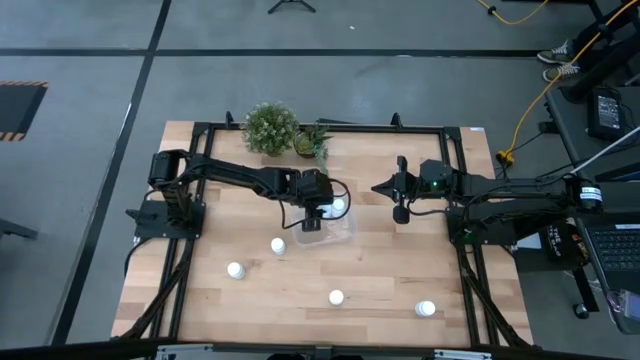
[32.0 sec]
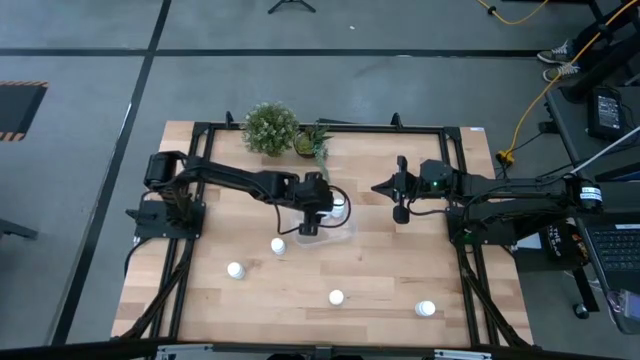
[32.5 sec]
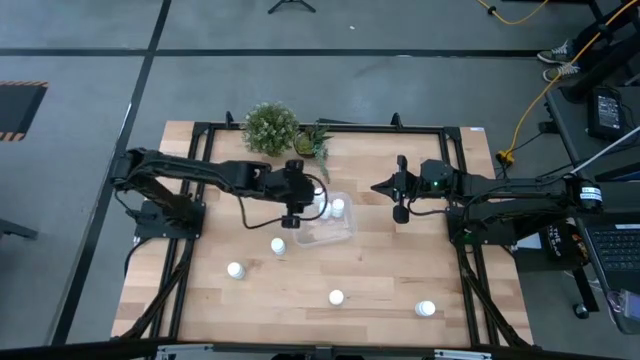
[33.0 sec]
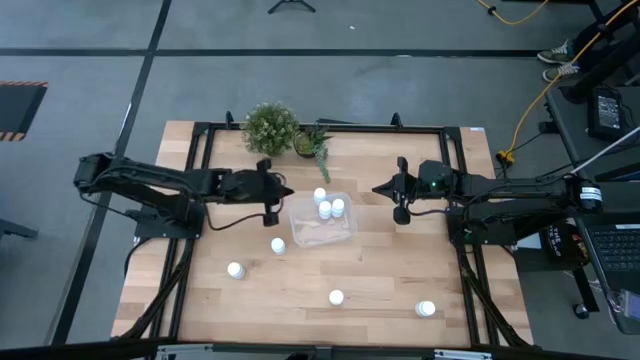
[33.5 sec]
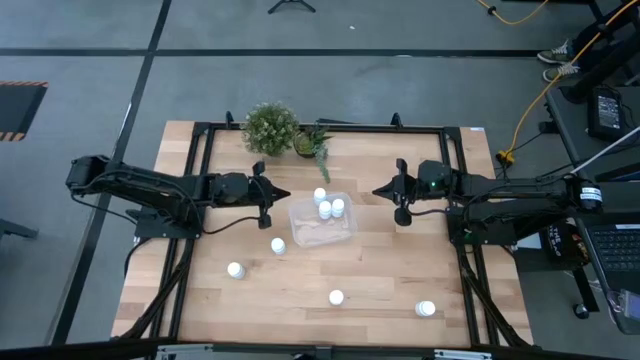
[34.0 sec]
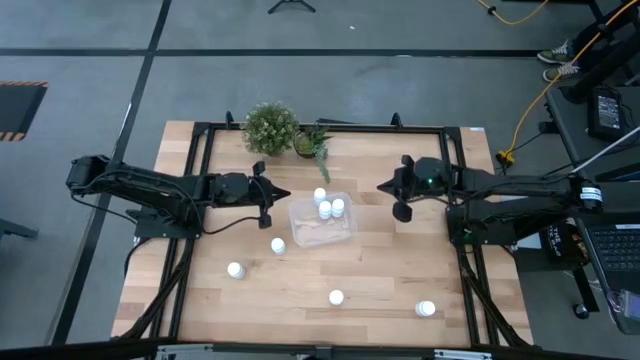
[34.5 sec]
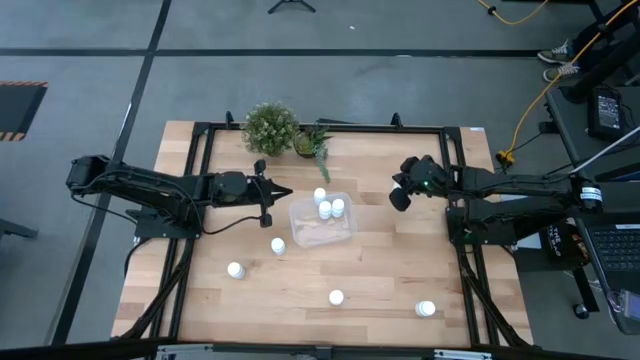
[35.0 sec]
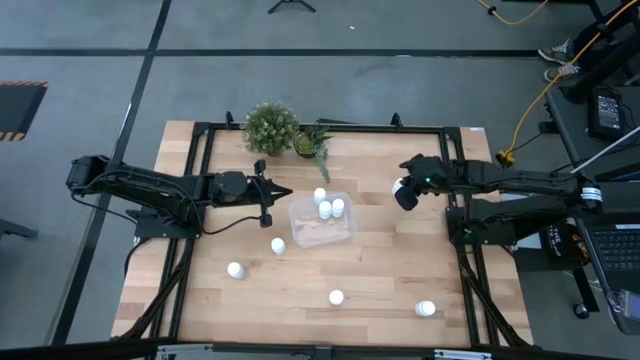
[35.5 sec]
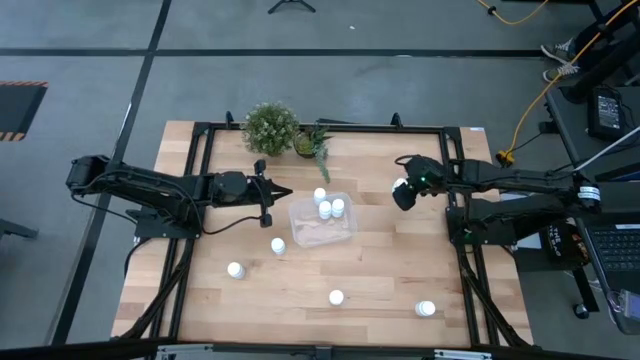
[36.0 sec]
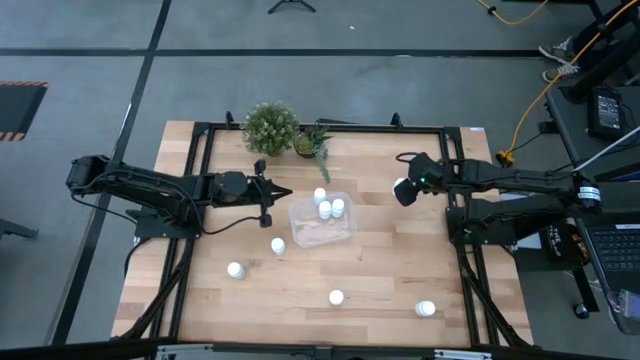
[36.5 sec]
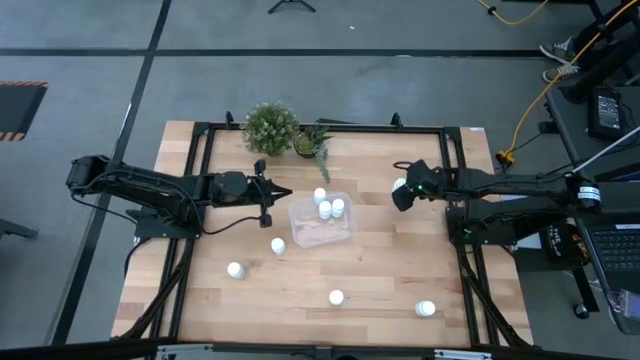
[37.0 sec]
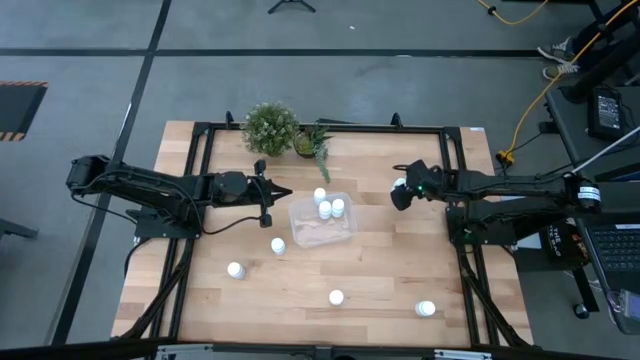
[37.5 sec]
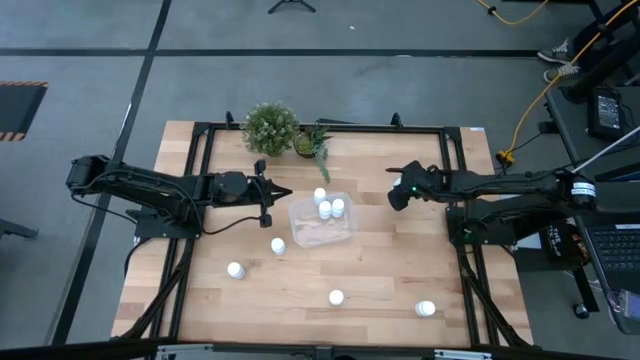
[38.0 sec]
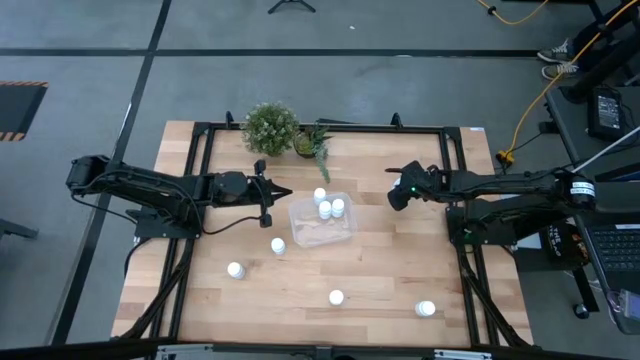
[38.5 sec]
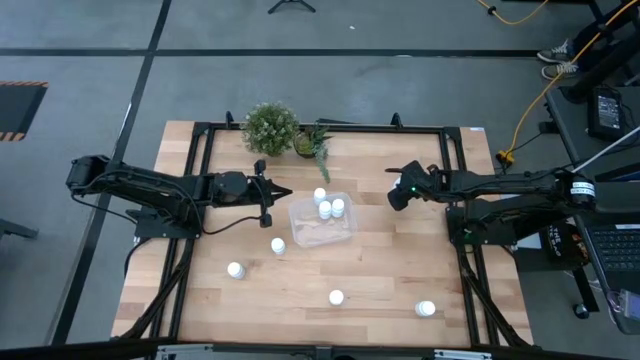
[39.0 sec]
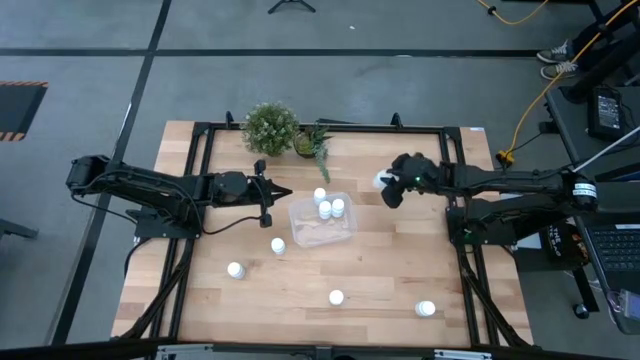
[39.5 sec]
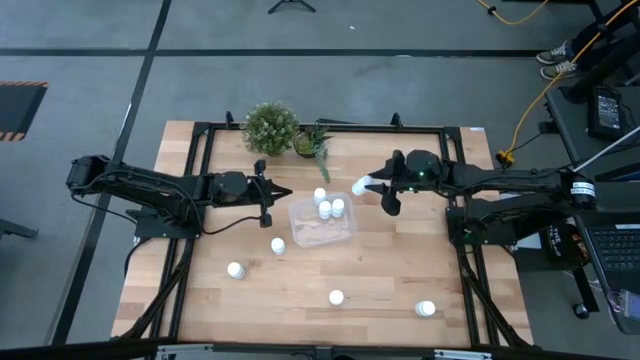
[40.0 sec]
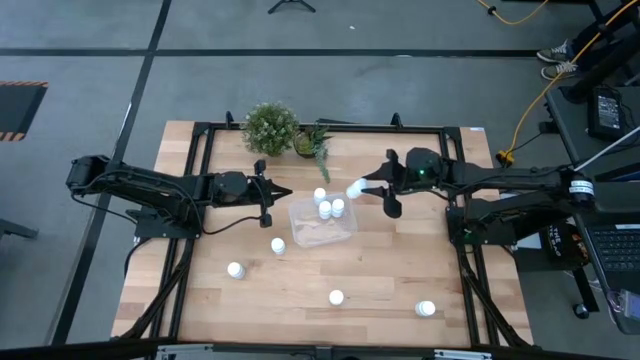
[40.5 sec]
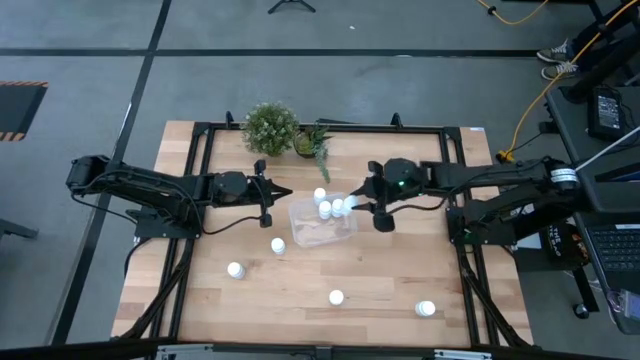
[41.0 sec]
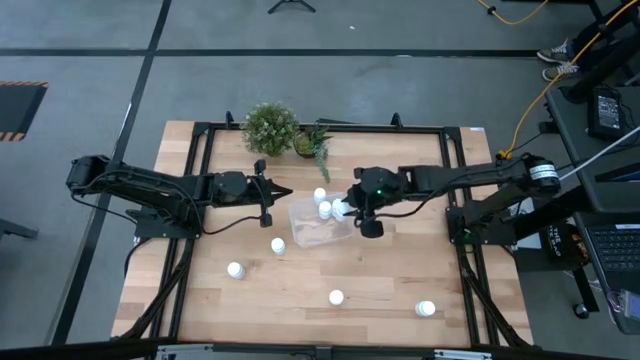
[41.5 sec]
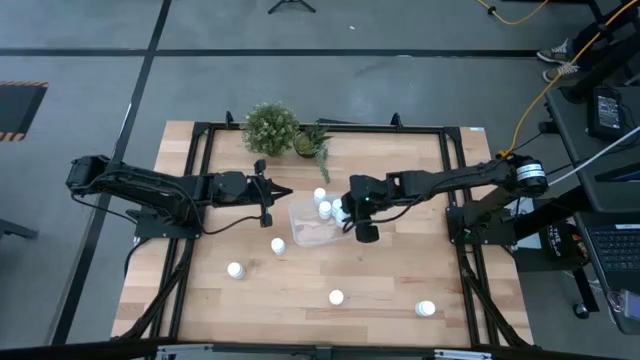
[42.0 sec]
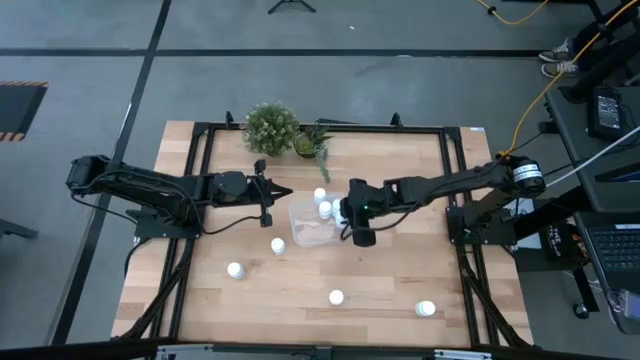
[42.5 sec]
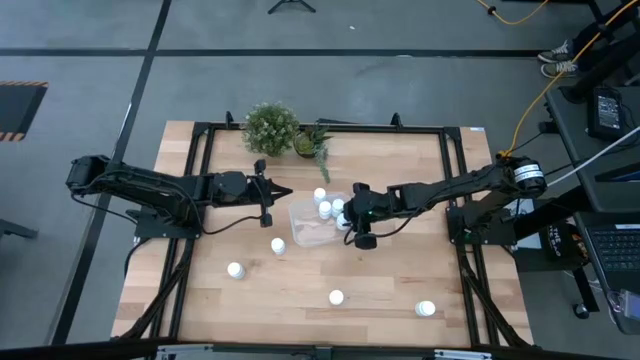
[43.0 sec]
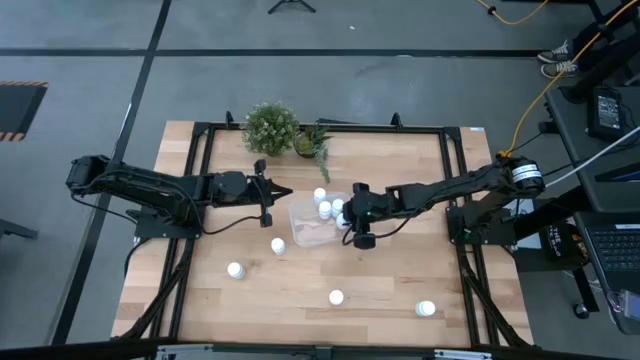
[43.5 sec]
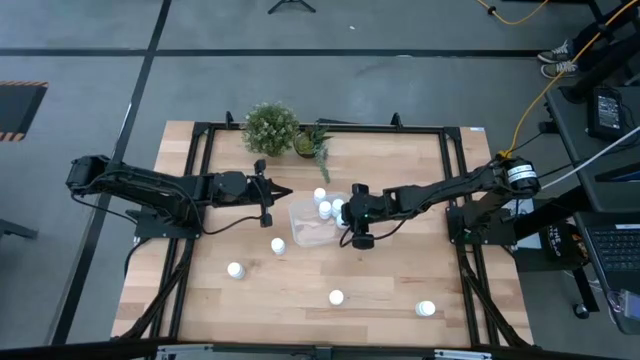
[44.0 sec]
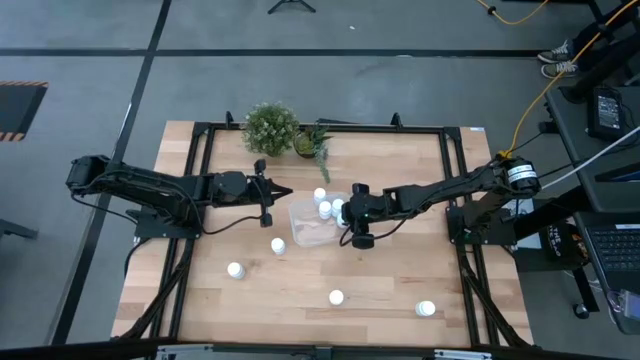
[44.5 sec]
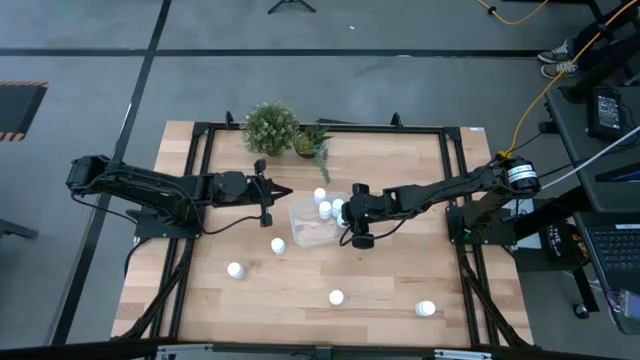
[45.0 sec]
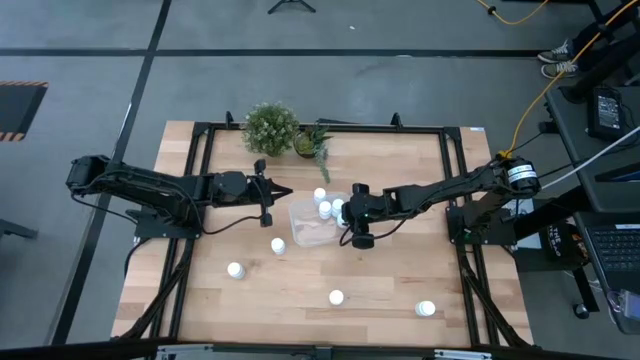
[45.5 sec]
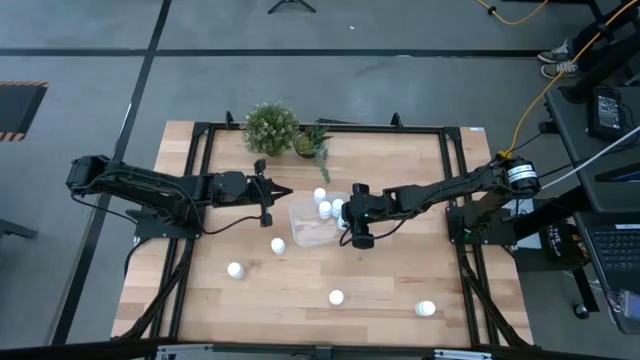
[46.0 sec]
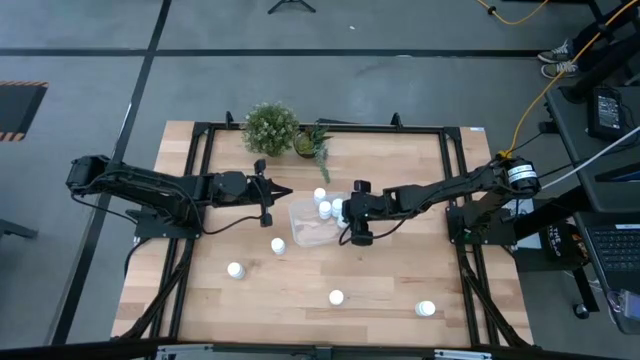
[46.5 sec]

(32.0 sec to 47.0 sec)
Task: Pick and place pill bottles into a basket
Put the white pill bottle into the transparent bin

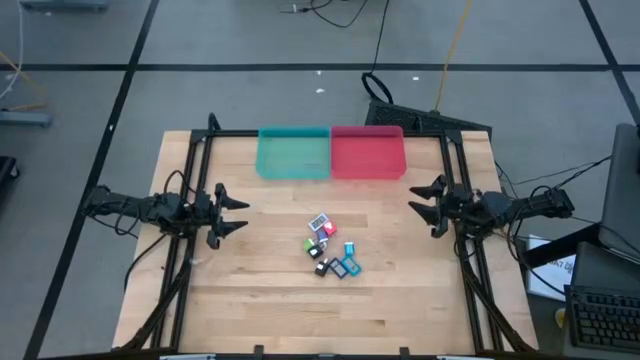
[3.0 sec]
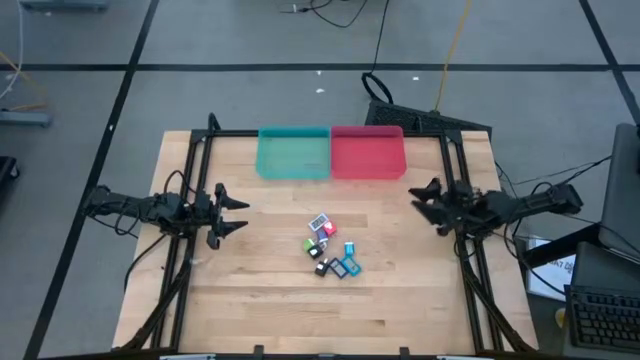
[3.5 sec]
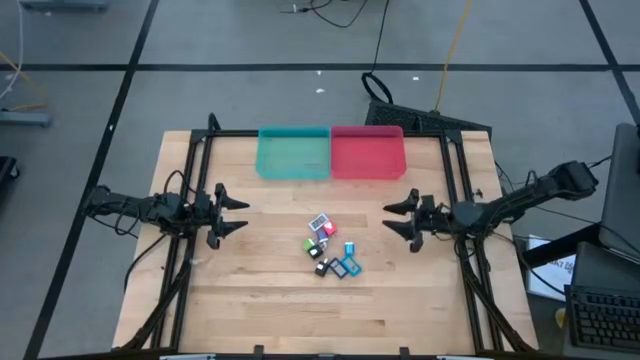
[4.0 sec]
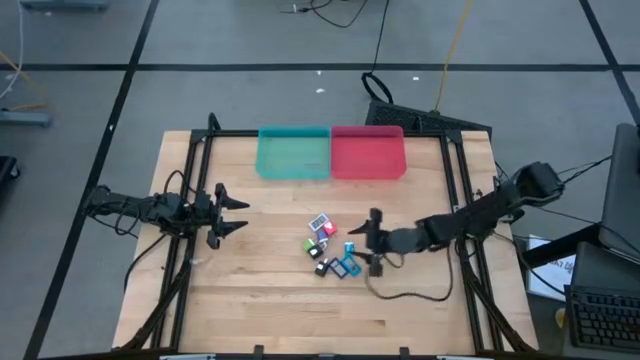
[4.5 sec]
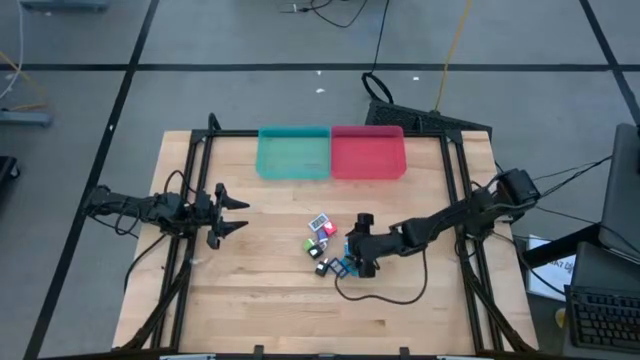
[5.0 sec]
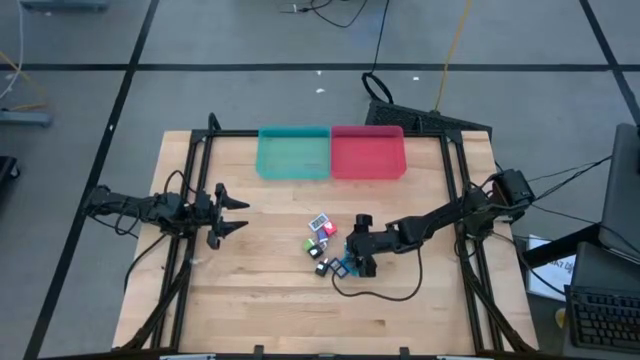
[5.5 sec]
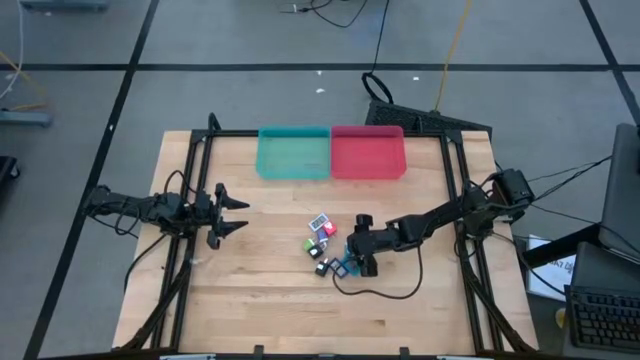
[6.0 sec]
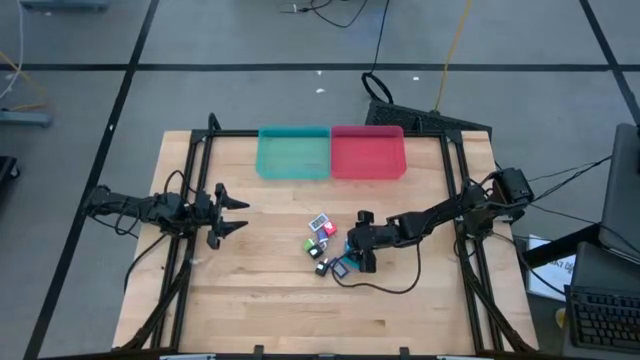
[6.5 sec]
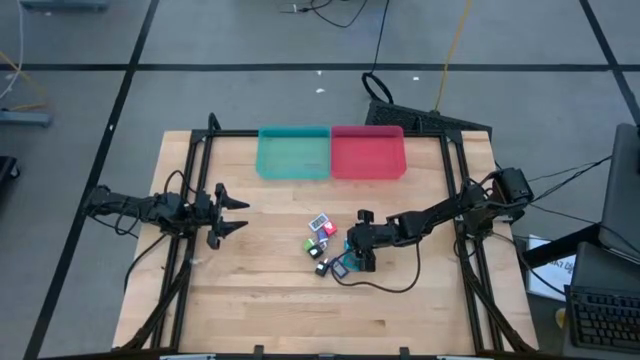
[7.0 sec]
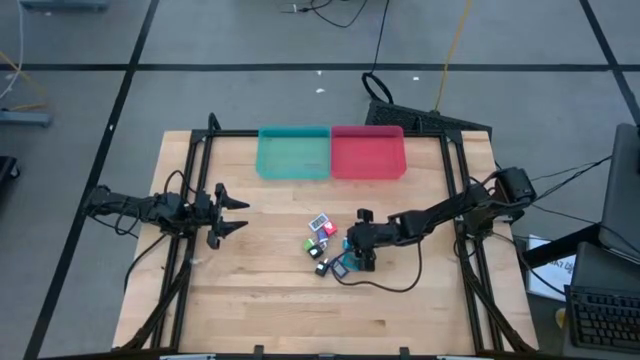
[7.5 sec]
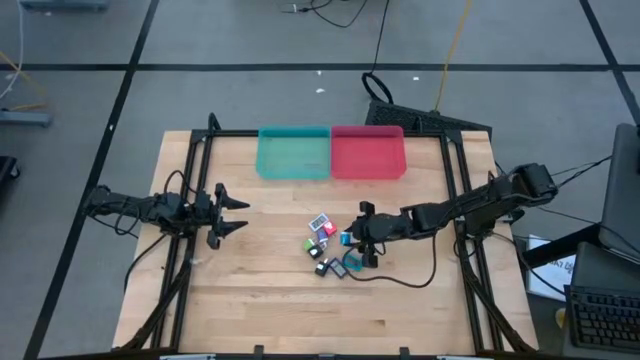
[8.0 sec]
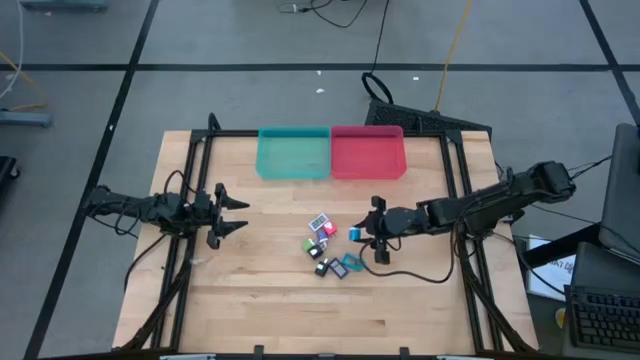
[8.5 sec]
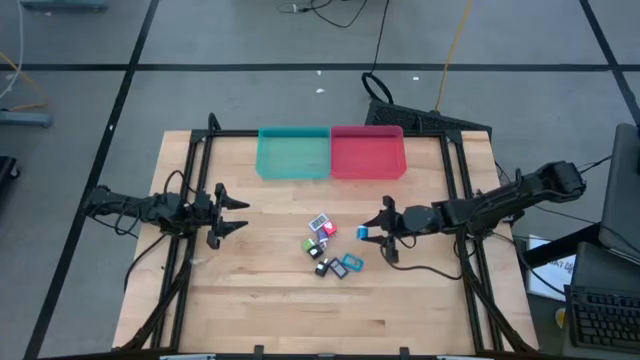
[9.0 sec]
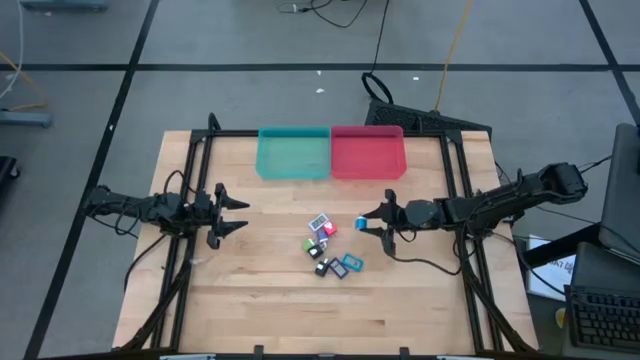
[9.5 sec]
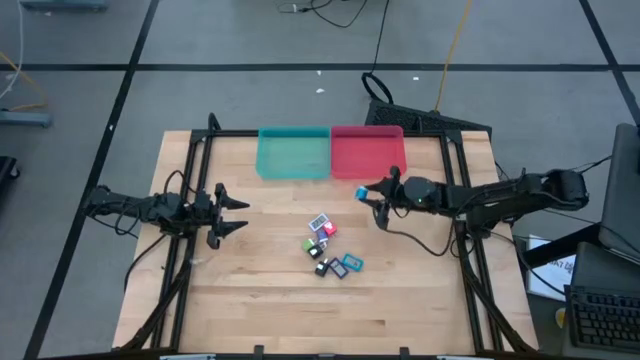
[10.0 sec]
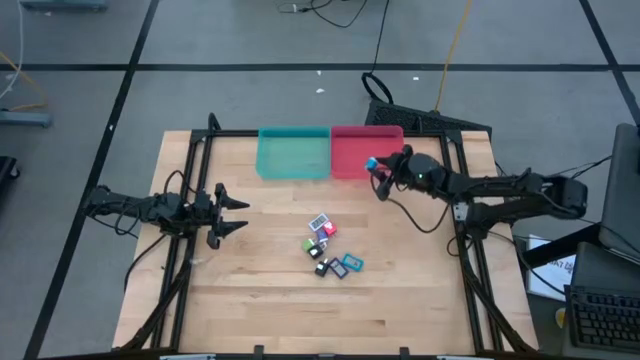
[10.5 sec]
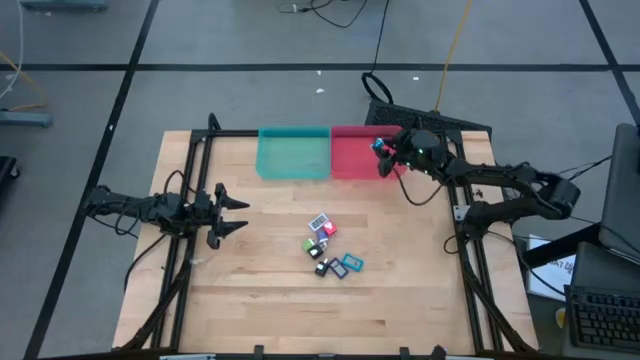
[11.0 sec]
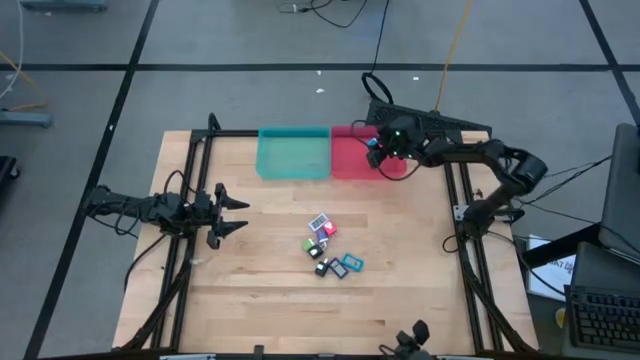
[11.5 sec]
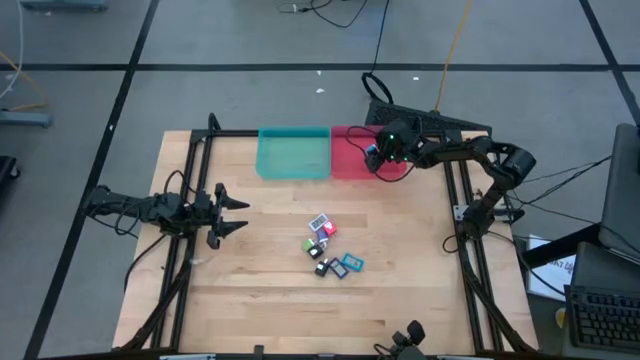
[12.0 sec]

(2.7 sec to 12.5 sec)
Task: Sort charging adapters and watches
Put the light blue charging adapter in the red bin
